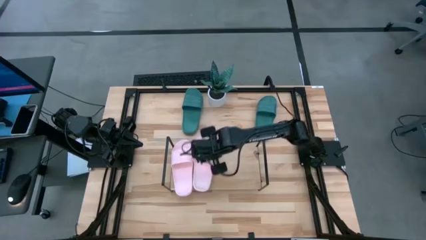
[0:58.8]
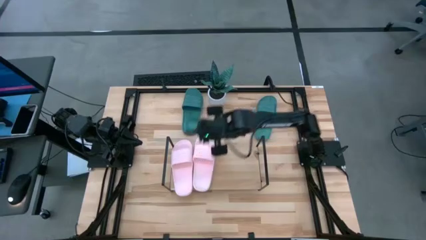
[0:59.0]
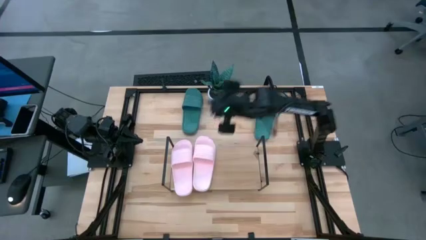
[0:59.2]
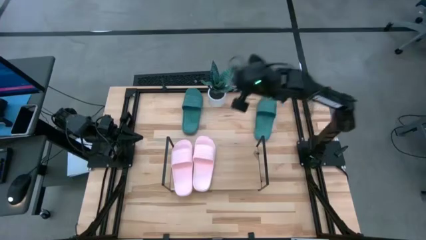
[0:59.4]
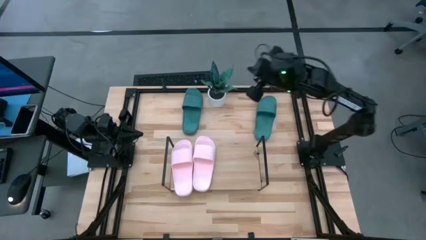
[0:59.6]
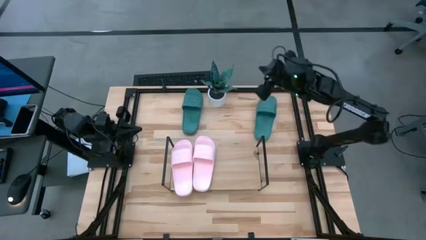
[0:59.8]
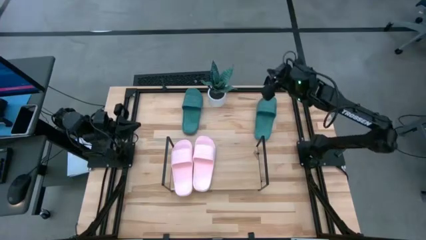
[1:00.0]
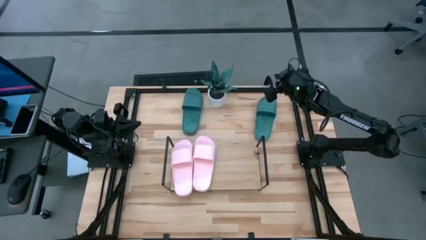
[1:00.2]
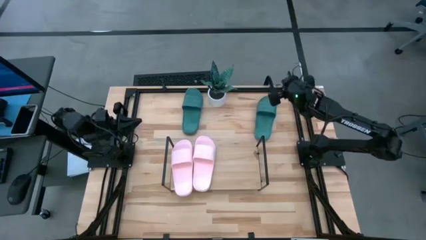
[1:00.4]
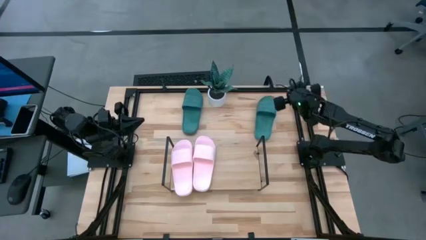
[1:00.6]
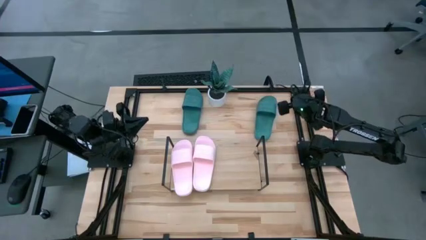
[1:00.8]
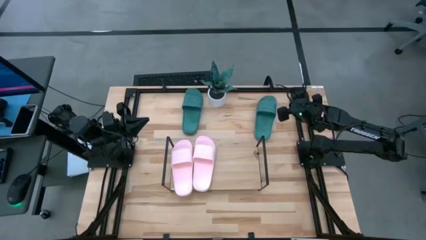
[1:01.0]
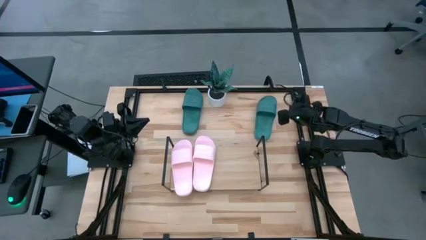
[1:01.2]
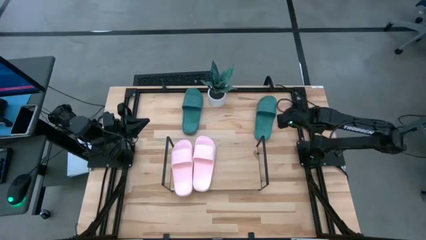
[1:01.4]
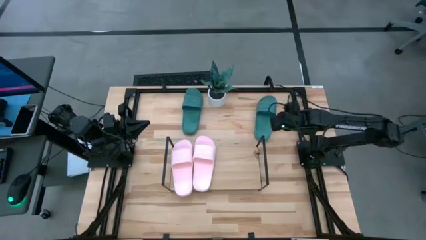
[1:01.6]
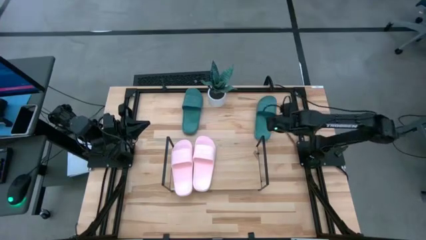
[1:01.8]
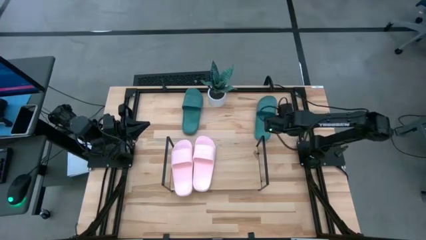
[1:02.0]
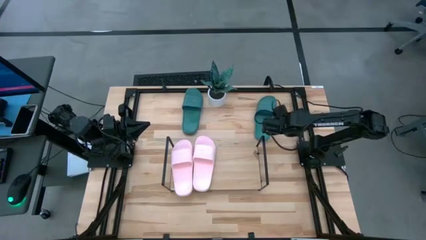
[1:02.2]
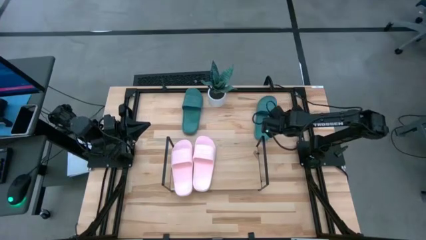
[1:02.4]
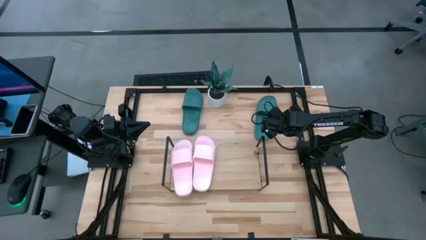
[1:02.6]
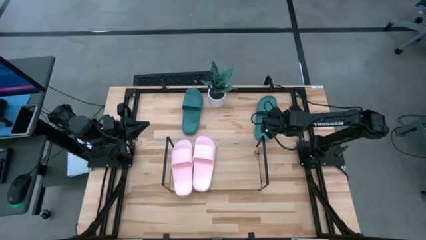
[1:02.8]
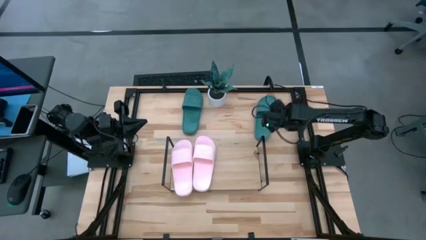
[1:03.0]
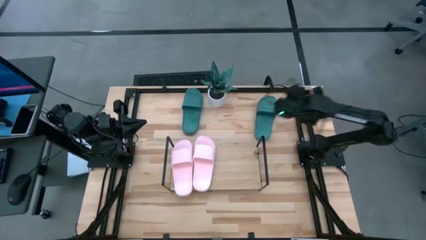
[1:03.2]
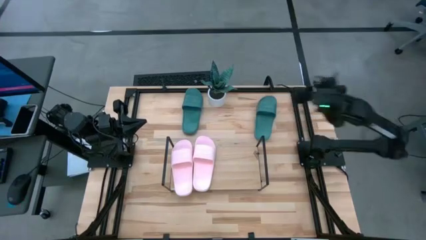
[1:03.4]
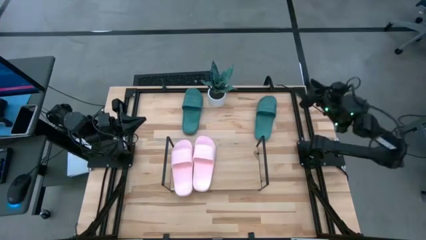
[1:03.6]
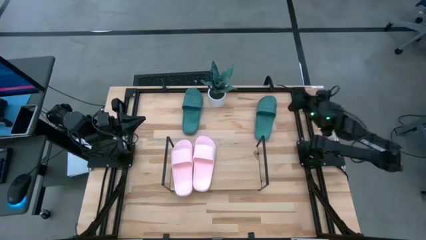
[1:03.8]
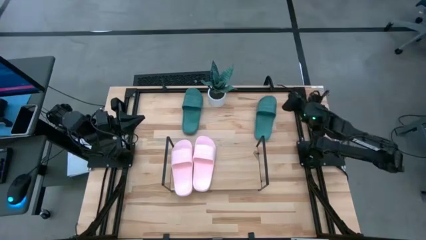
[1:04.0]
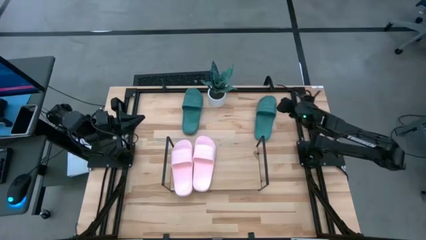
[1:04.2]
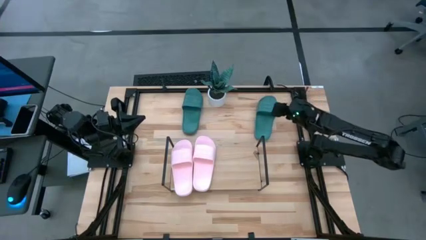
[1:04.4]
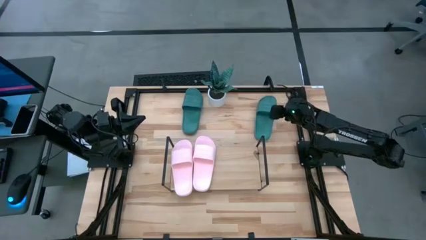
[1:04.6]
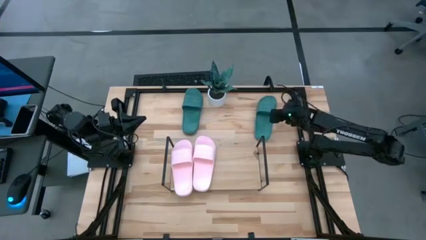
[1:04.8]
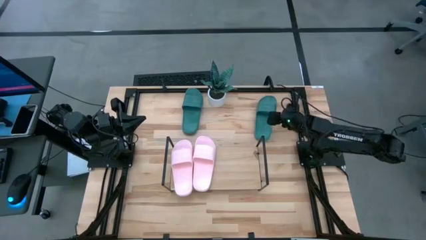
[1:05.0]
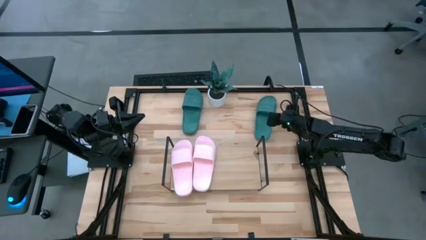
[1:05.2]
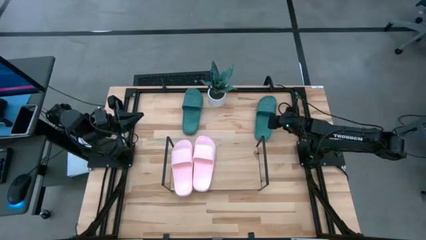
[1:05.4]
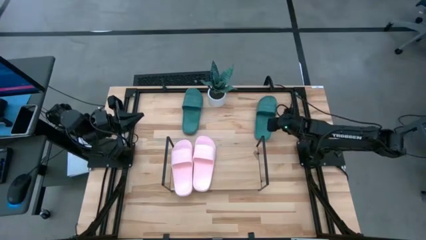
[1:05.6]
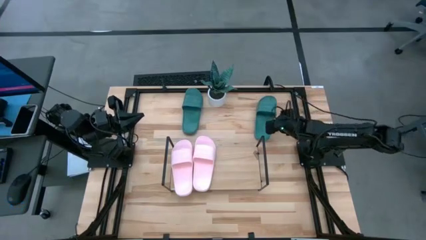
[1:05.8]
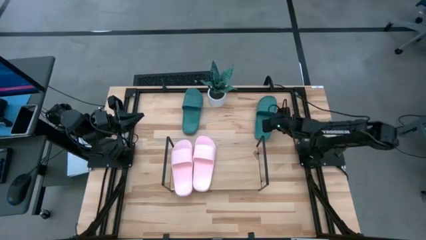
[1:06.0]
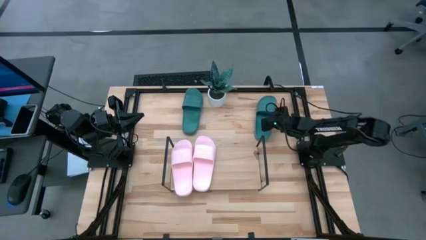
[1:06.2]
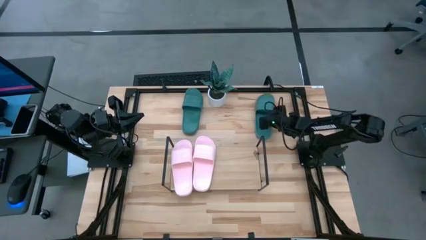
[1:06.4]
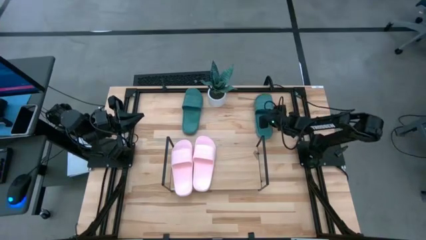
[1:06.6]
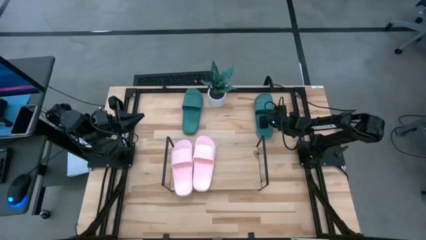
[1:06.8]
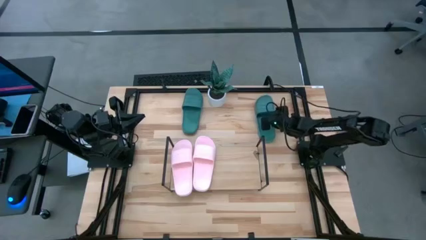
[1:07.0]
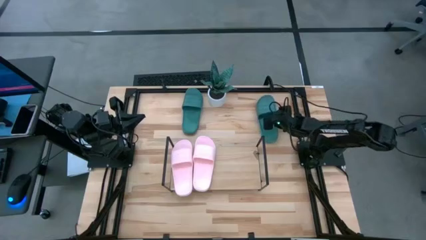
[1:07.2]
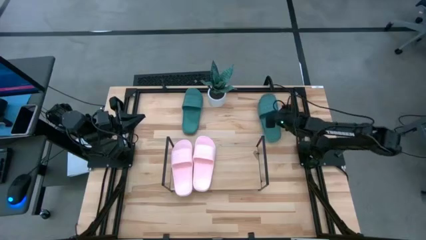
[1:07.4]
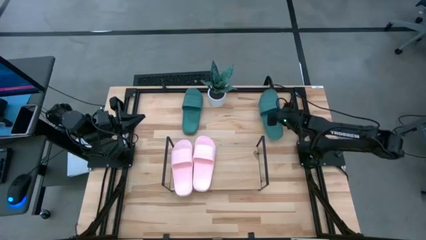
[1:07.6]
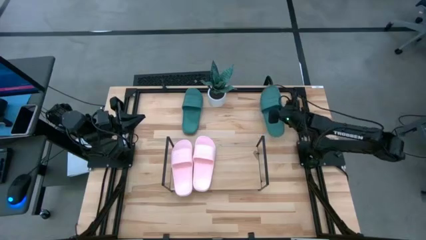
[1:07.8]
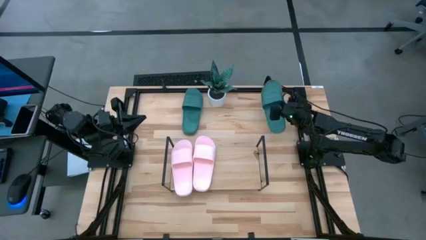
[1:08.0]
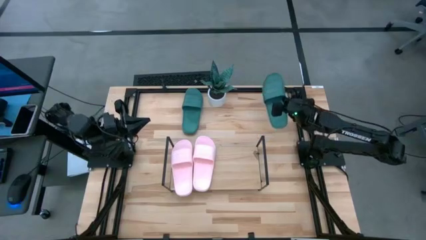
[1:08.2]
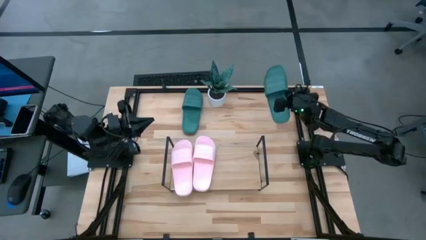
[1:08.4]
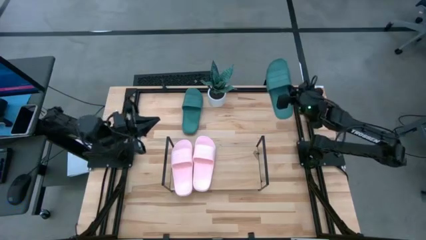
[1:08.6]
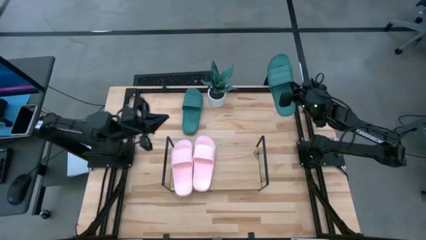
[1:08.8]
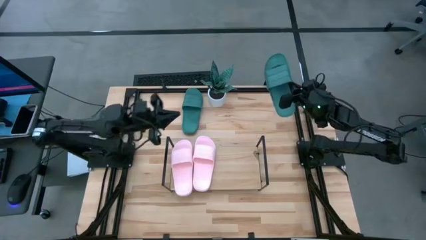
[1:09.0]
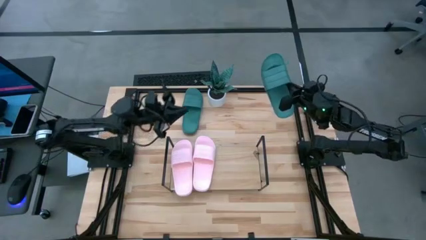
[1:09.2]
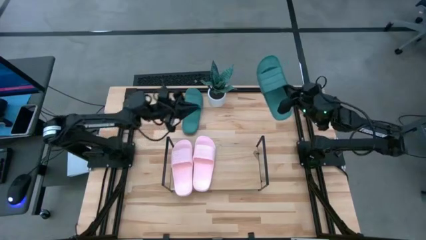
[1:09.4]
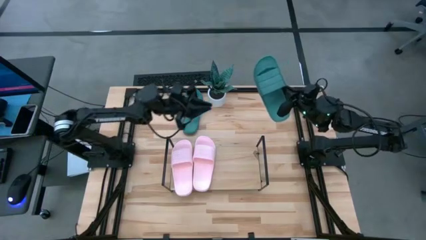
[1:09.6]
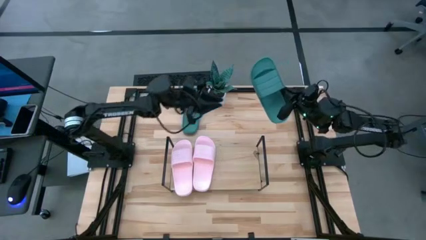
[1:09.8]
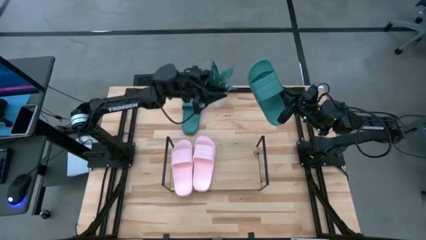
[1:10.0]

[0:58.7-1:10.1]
Task: Pick and place slides into the shelf
Put the right green slide on the shelf
